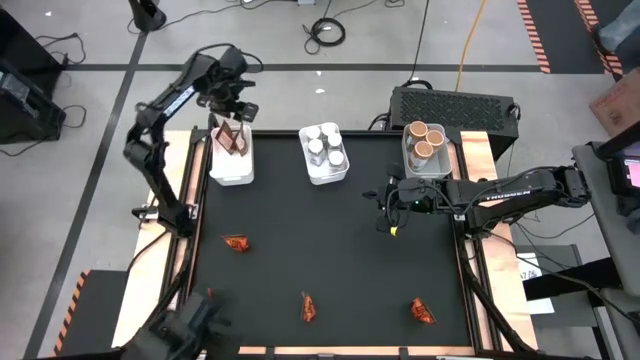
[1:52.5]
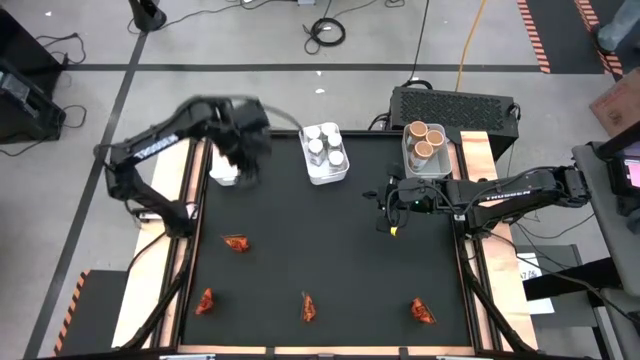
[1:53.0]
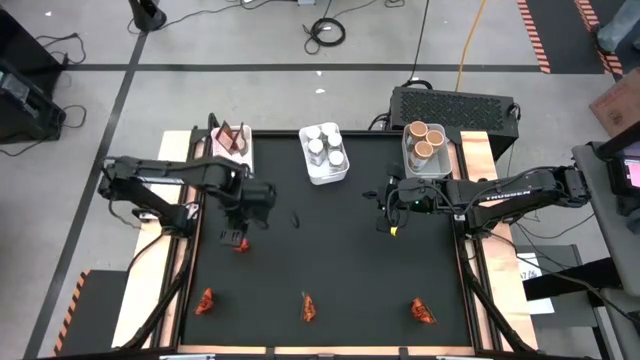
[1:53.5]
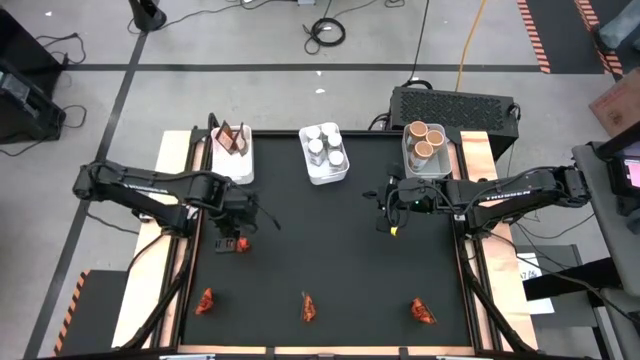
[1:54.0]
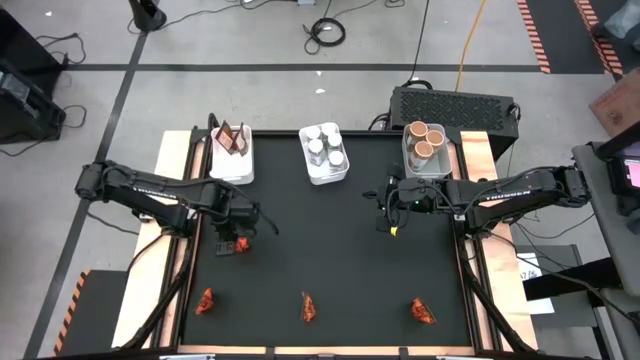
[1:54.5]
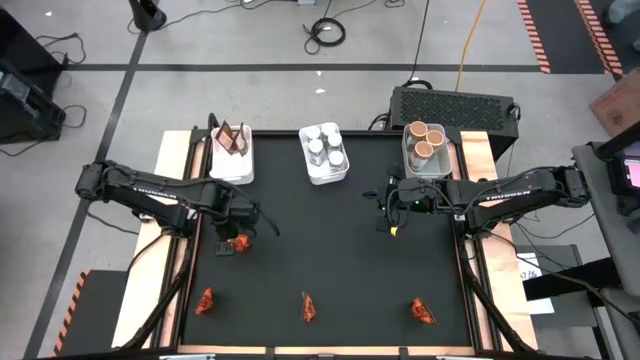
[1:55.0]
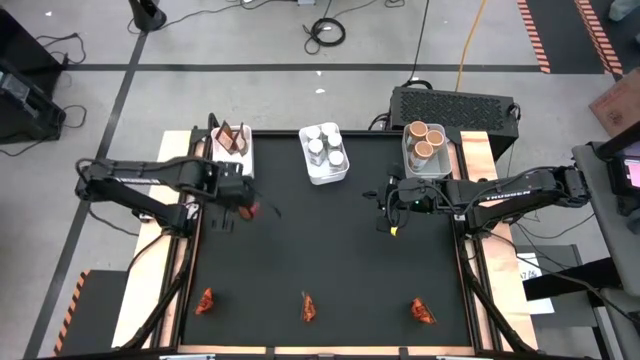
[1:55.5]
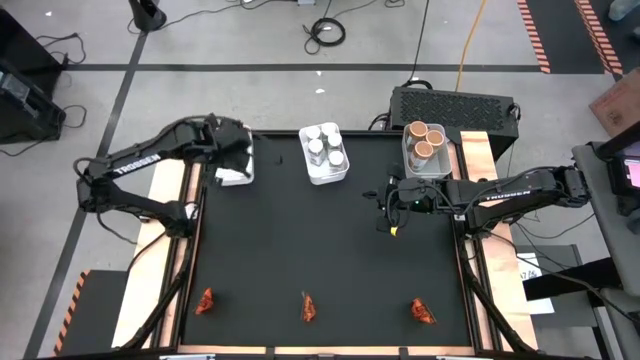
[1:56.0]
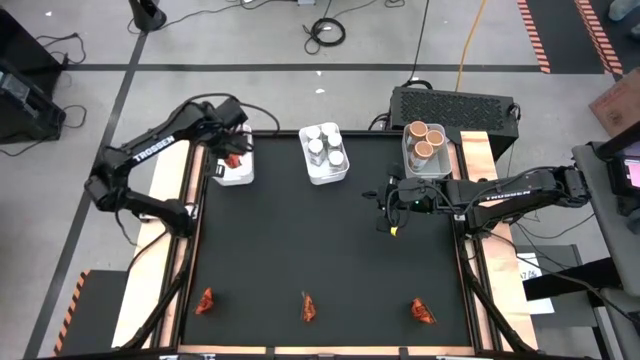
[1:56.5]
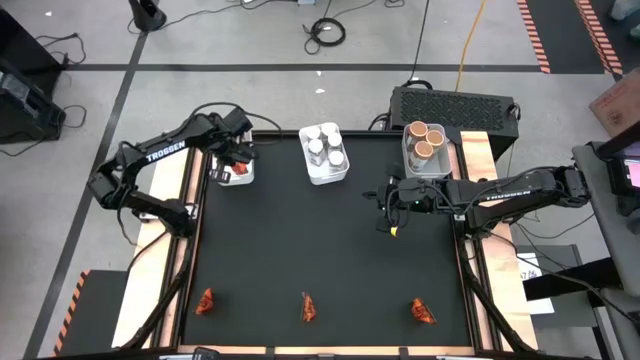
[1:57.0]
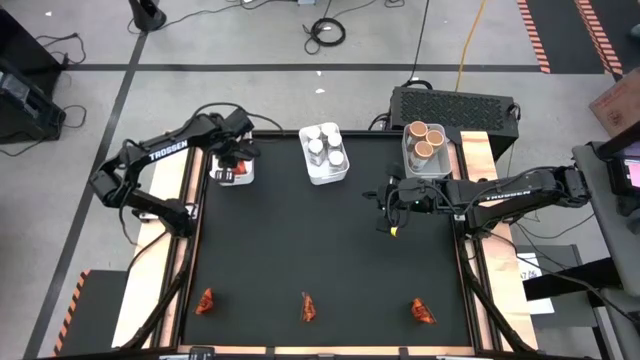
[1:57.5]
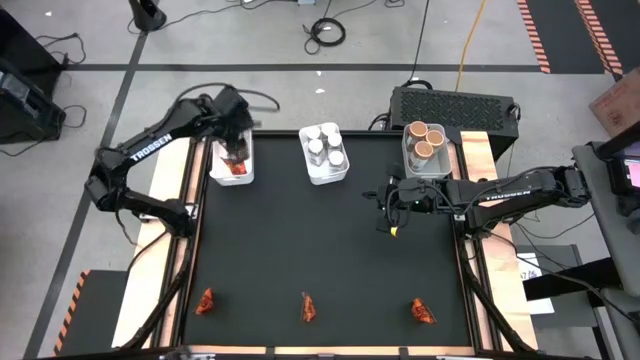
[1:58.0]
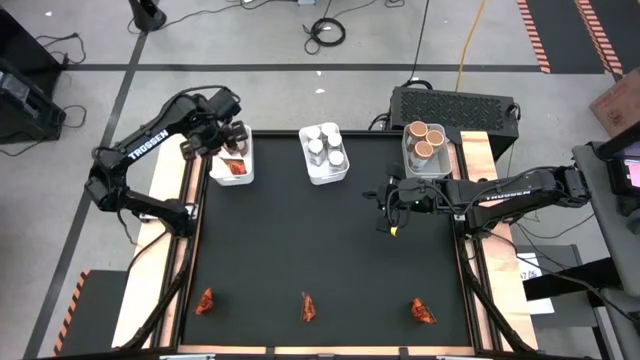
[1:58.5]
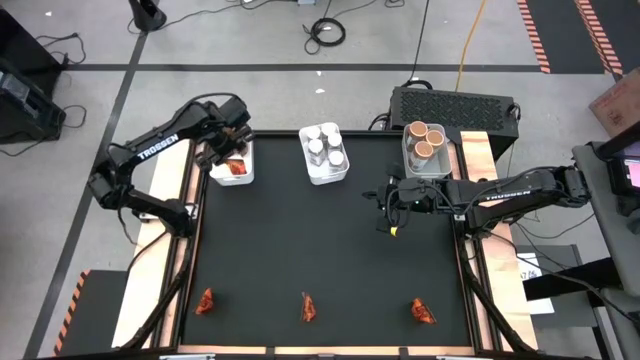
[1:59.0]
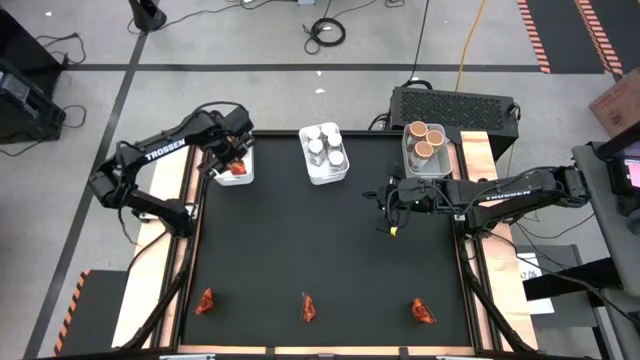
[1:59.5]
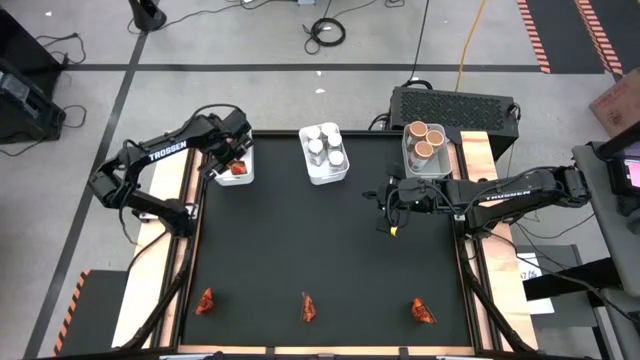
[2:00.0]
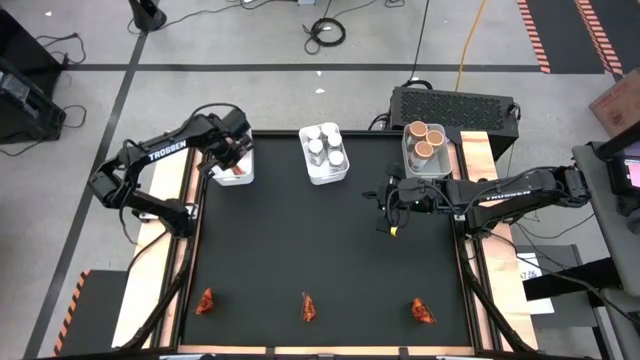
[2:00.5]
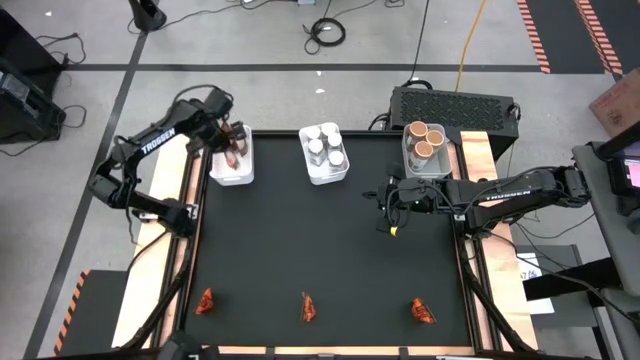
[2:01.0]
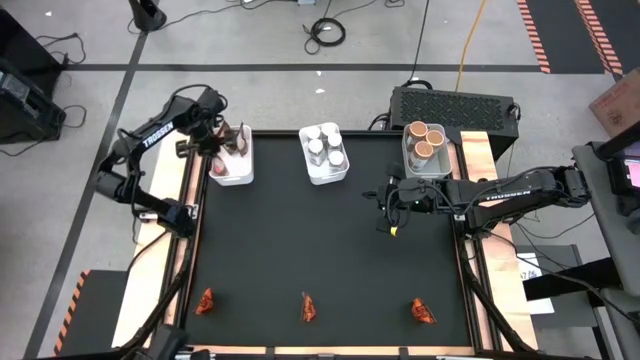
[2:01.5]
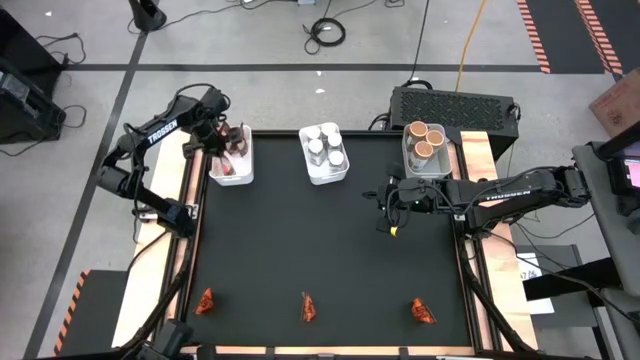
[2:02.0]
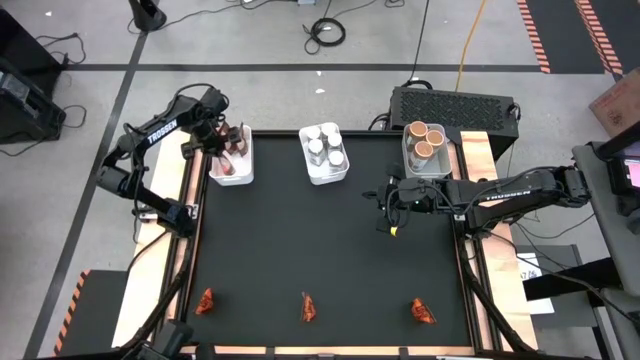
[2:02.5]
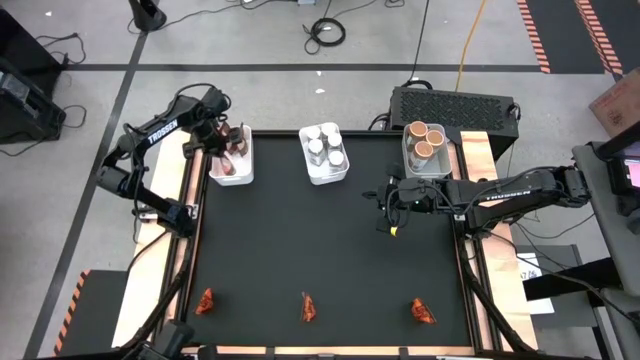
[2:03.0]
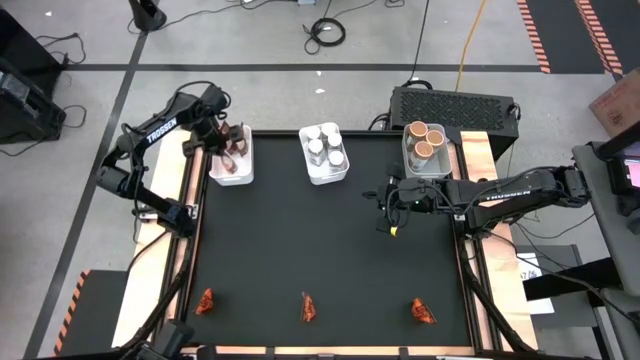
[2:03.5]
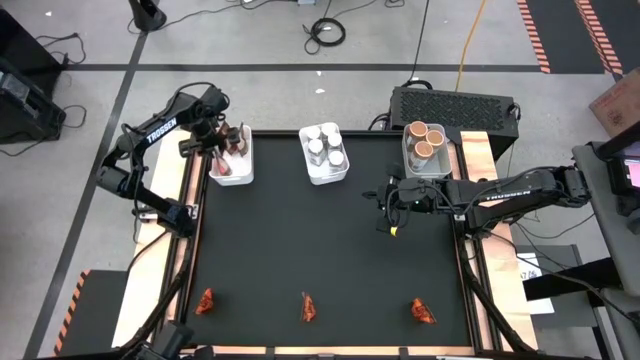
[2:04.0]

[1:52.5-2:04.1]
Task: Sort spices by type
Put the orange seasoning pack into the left white bin

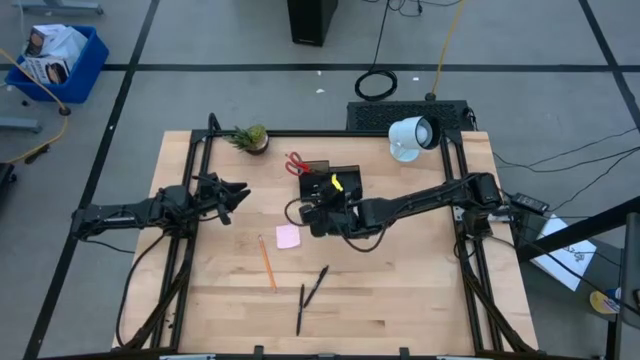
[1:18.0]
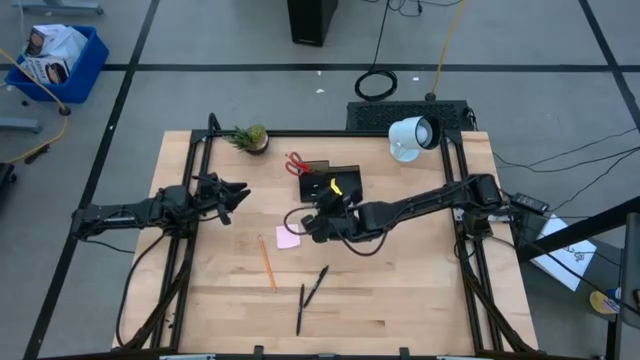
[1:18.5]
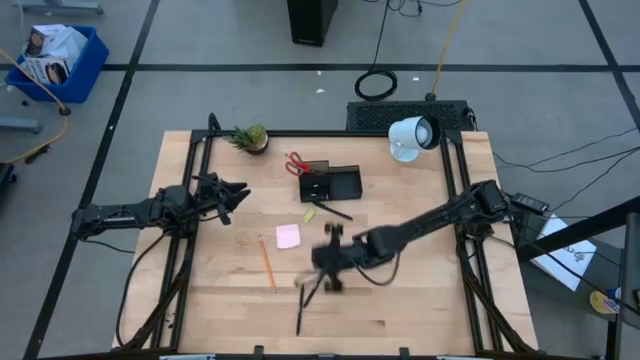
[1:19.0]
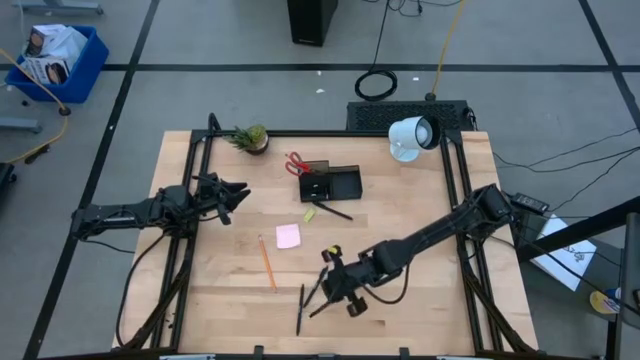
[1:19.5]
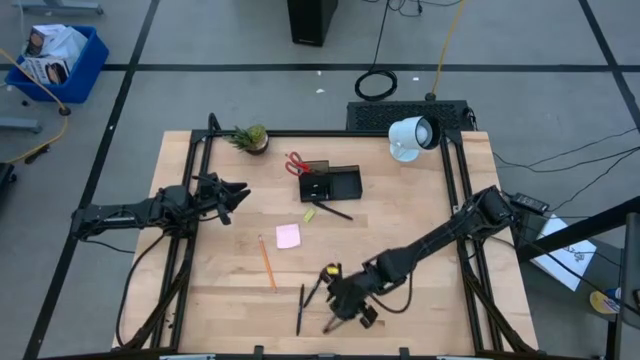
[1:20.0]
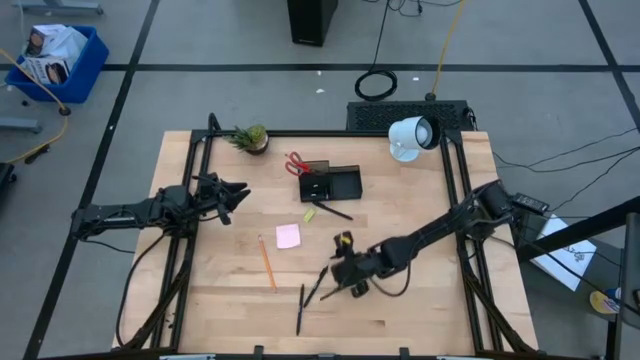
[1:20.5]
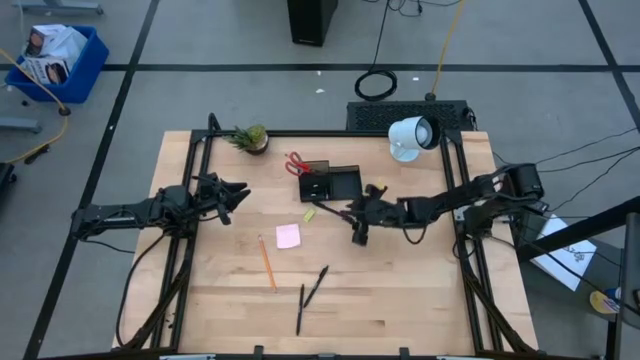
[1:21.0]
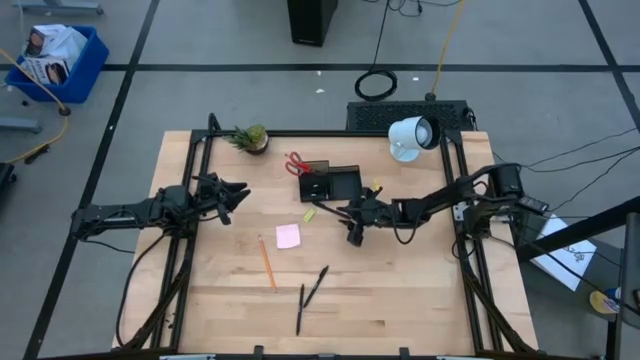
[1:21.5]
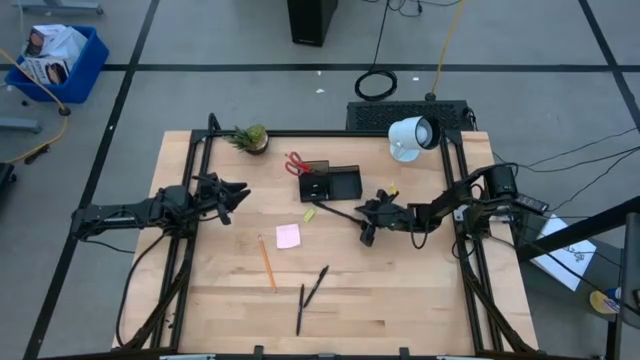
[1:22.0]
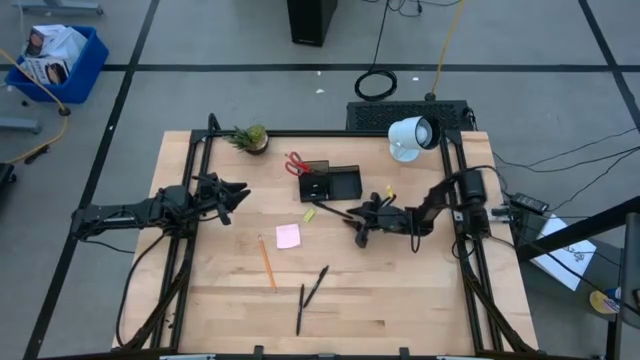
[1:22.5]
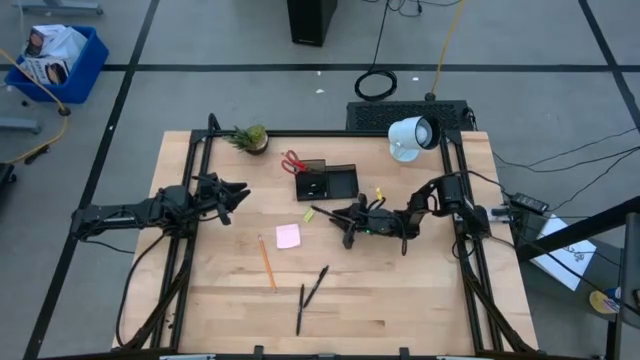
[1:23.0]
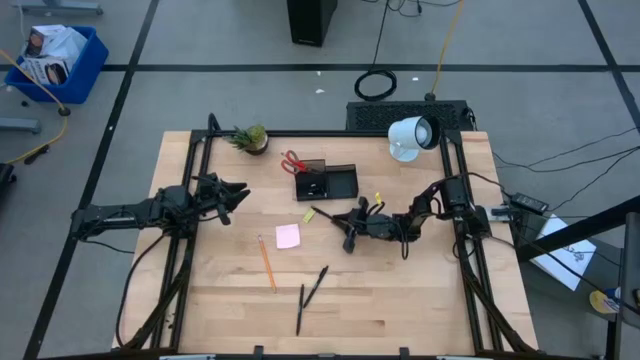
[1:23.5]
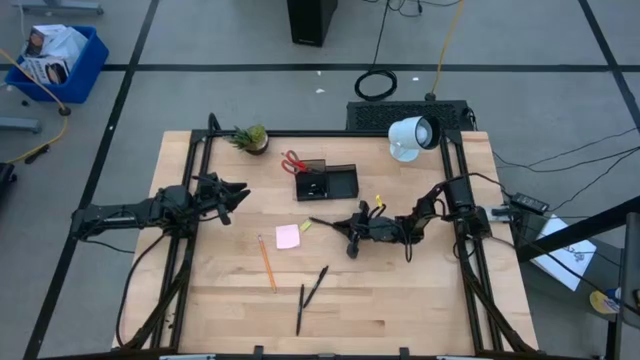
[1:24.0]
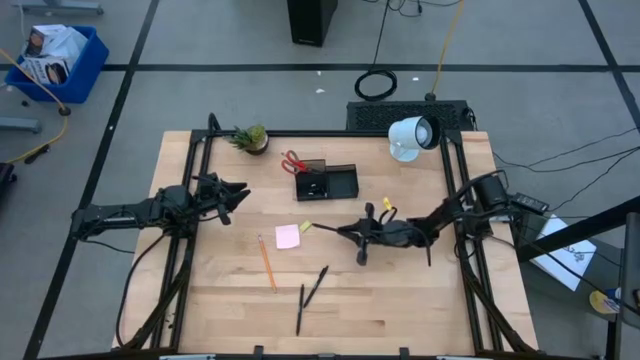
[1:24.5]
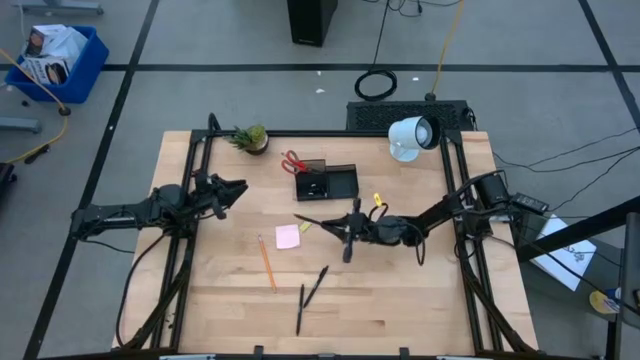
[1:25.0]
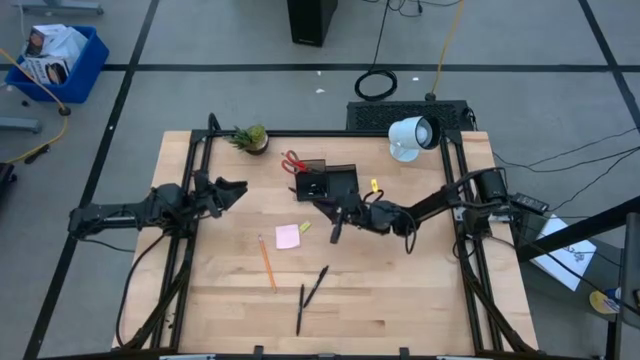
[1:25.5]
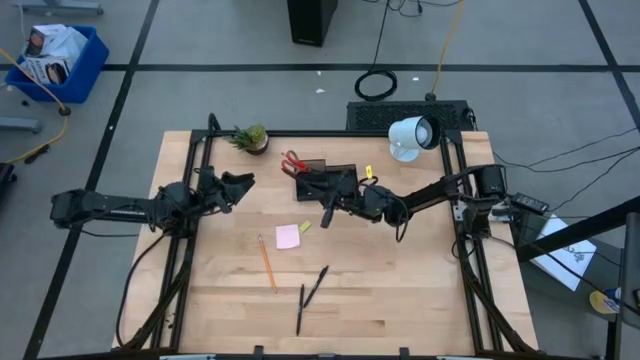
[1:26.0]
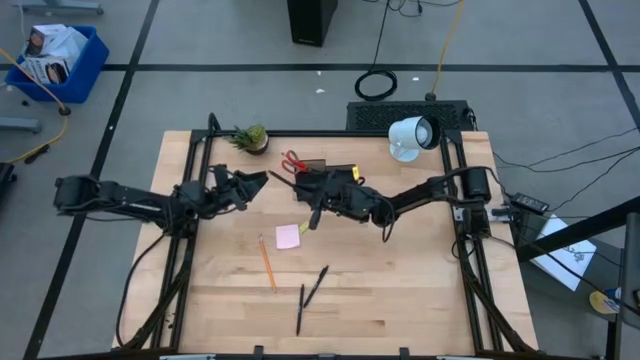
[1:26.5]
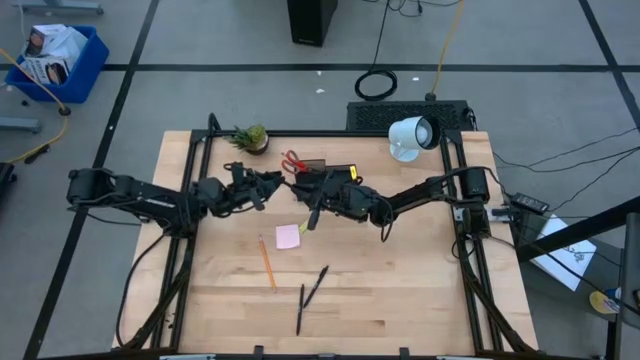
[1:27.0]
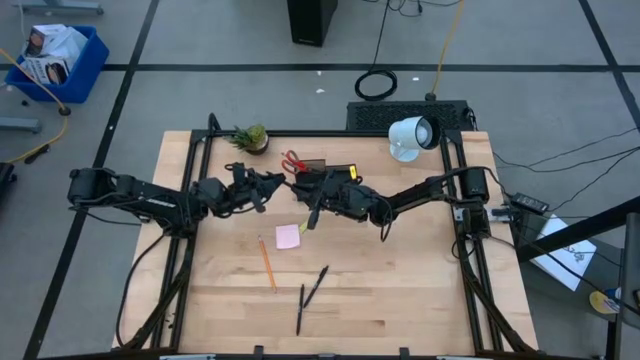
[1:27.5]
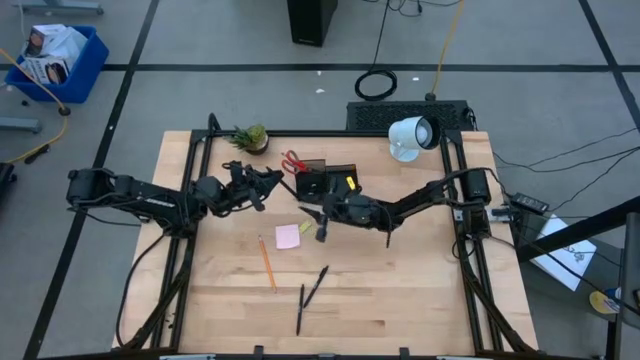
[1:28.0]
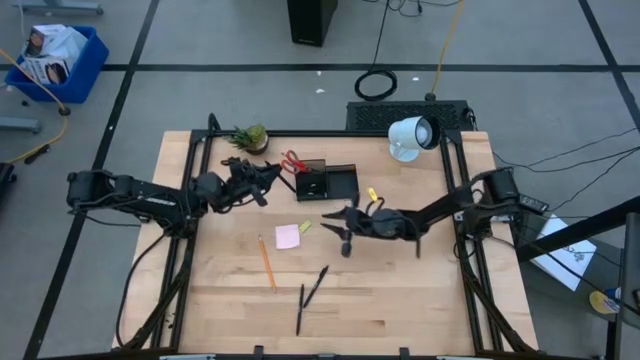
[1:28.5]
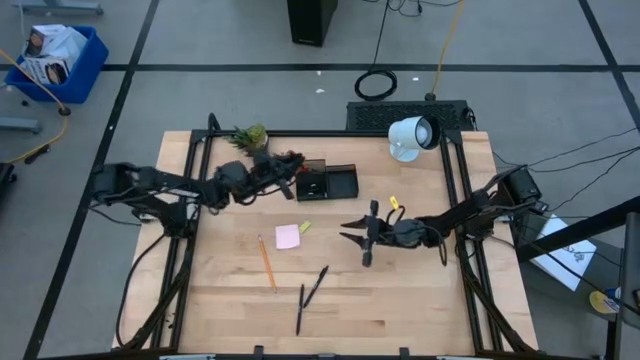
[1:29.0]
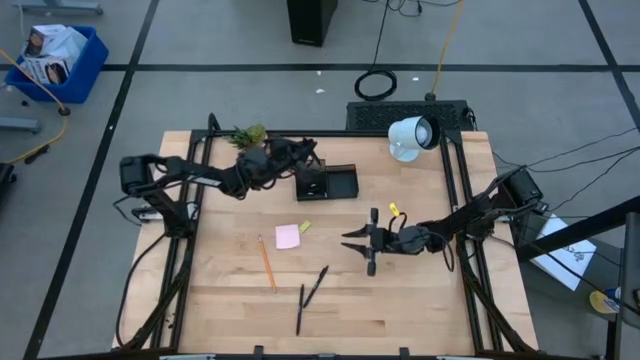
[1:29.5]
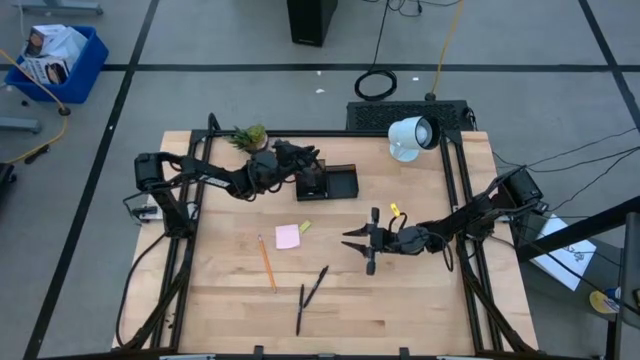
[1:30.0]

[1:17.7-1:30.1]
Task: Pick and place office supplies into organizer
Put the top pen into the mesh organizer
